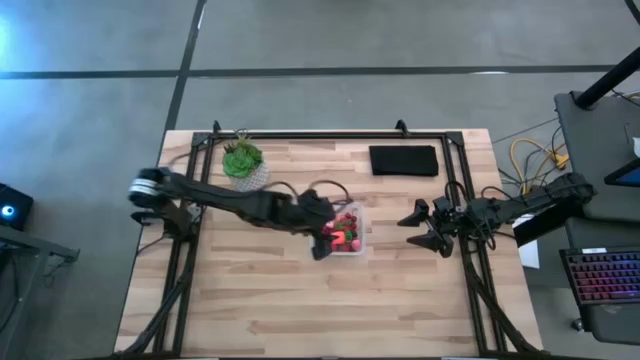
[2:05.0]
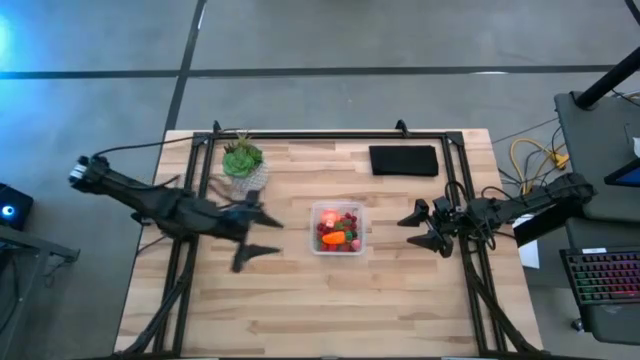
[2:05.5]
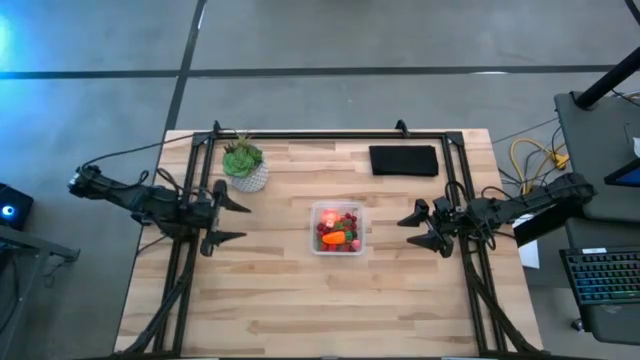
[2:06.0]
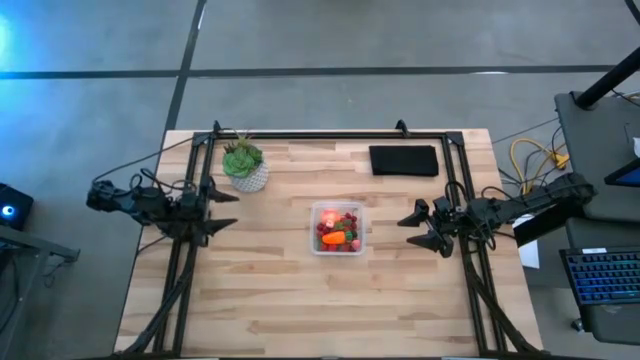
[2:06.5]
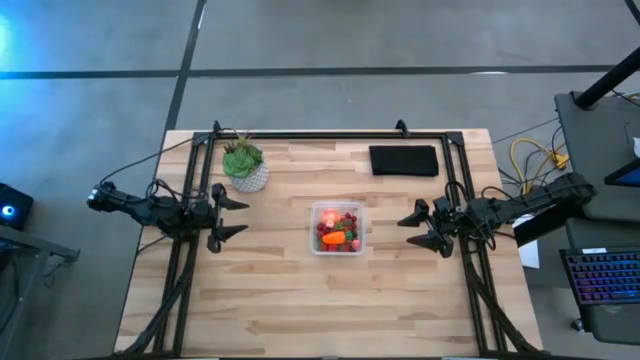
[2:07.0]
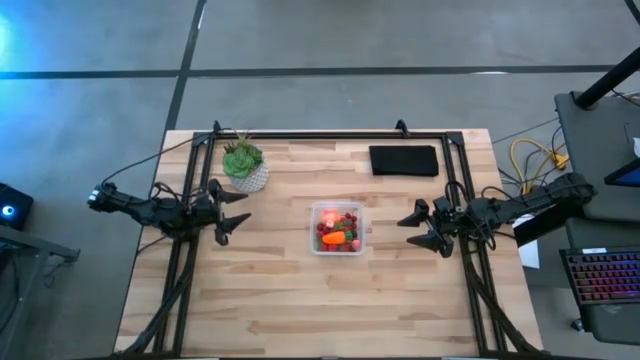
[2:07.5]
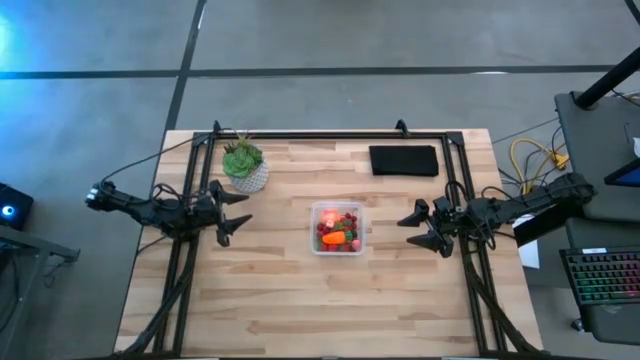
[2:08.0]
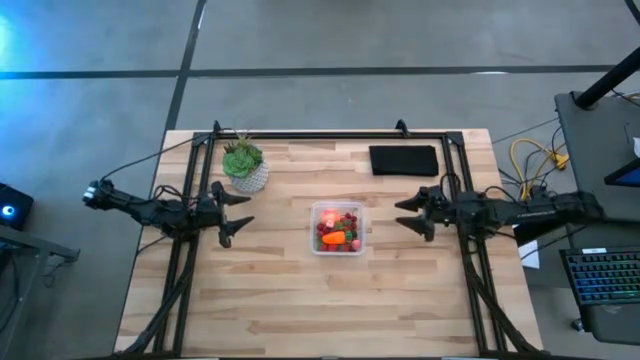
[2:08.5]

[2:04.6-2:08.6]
Task: Pick and placing Produce into tupperware
Return to Home Position

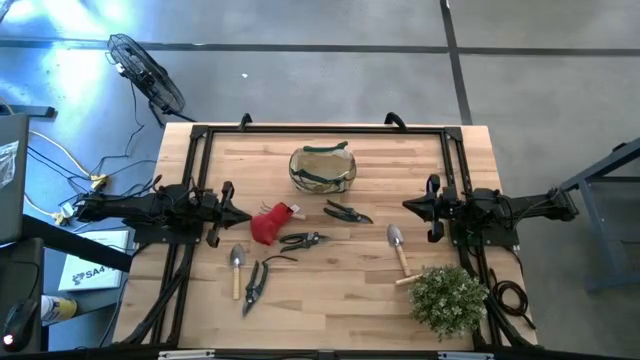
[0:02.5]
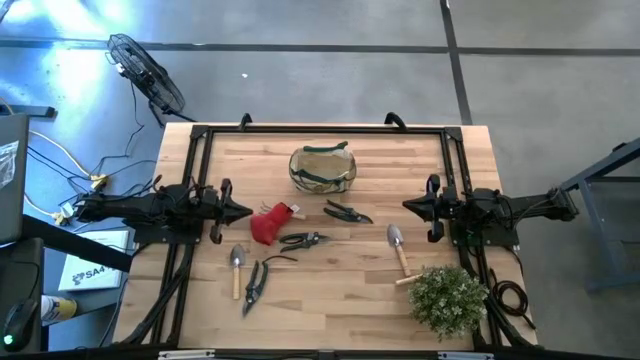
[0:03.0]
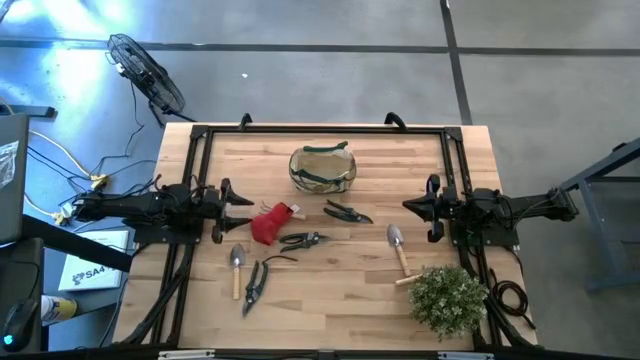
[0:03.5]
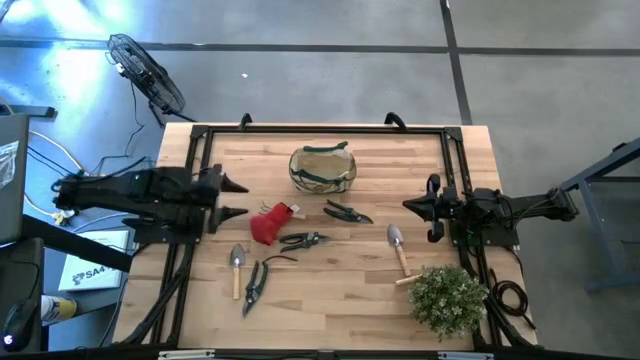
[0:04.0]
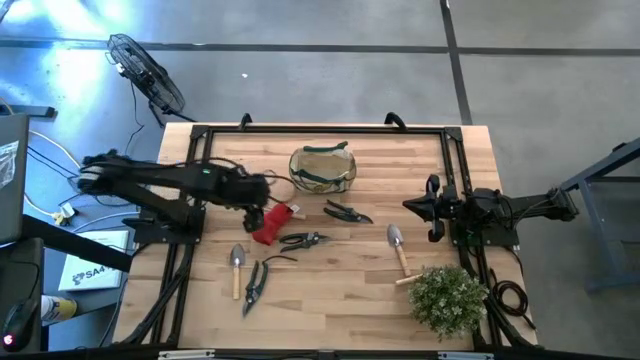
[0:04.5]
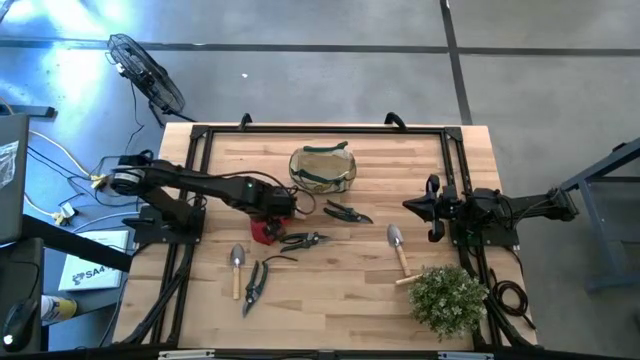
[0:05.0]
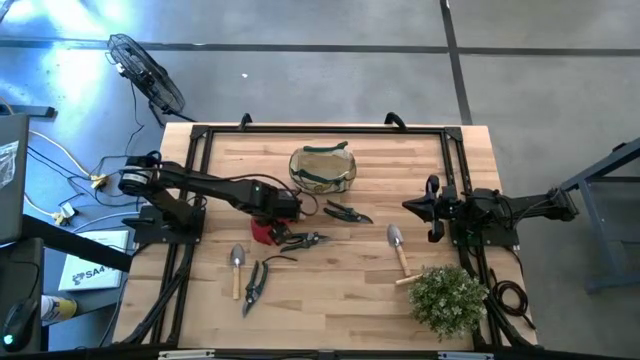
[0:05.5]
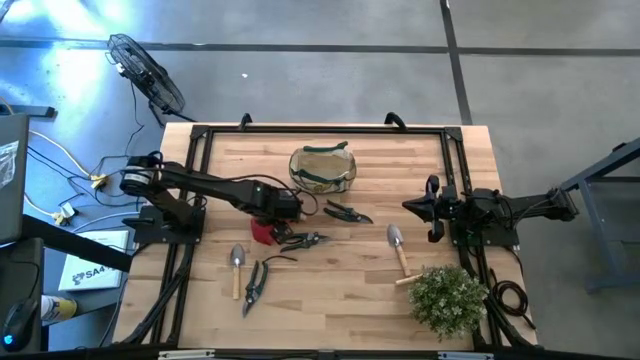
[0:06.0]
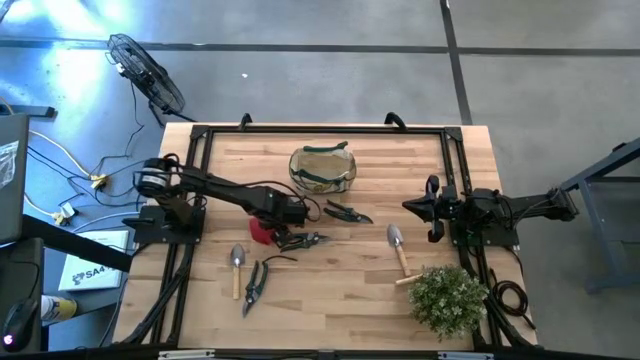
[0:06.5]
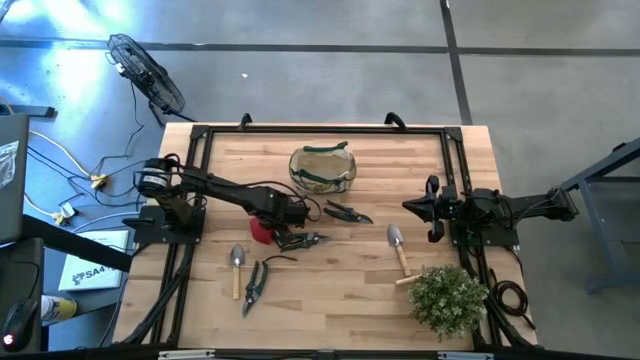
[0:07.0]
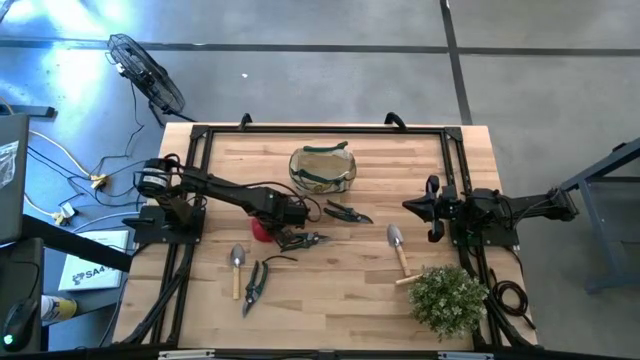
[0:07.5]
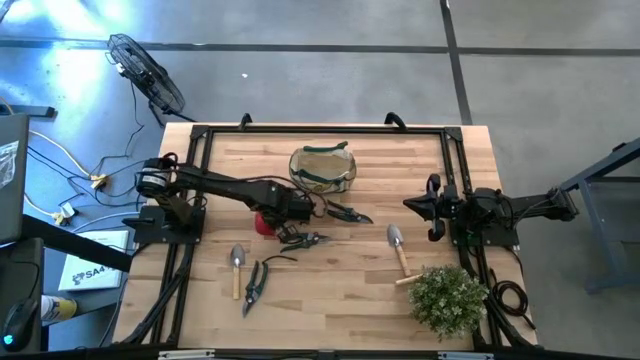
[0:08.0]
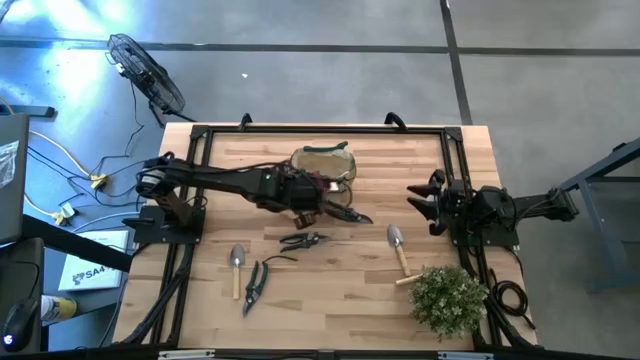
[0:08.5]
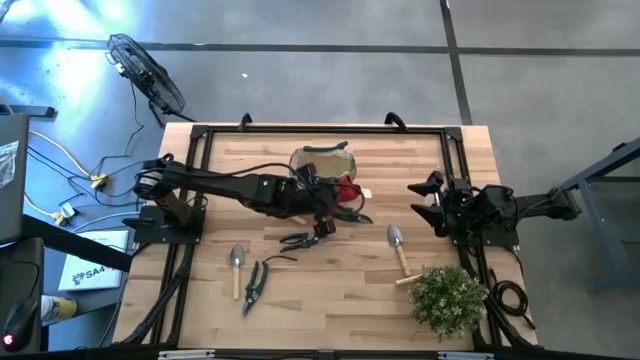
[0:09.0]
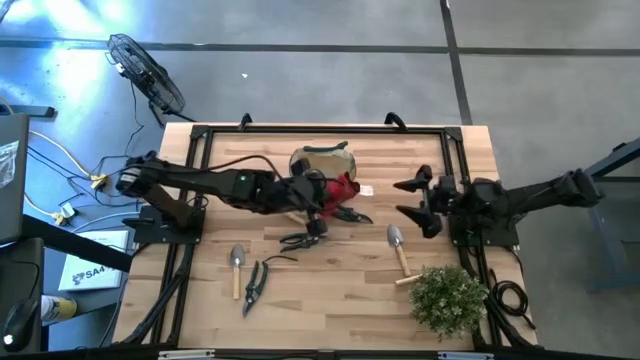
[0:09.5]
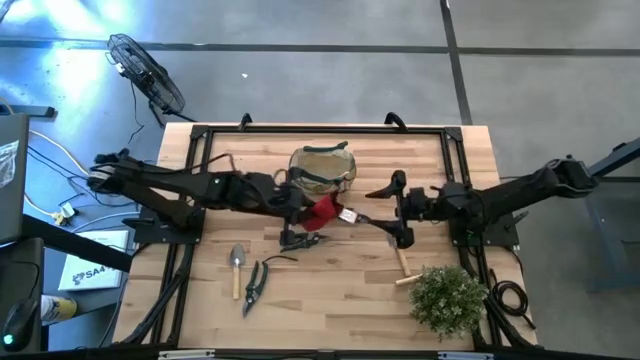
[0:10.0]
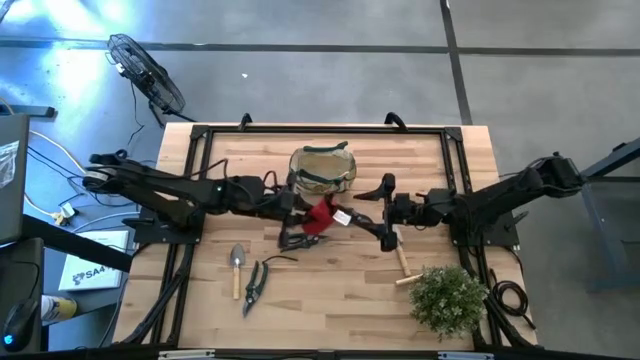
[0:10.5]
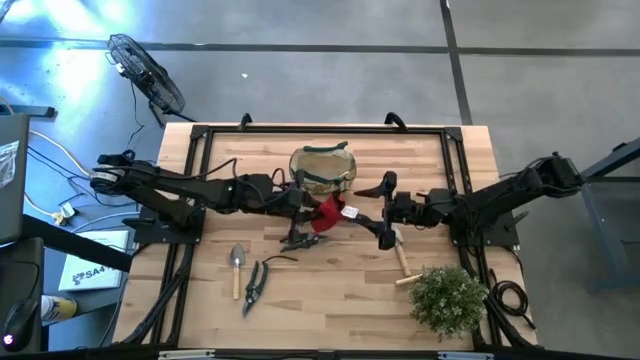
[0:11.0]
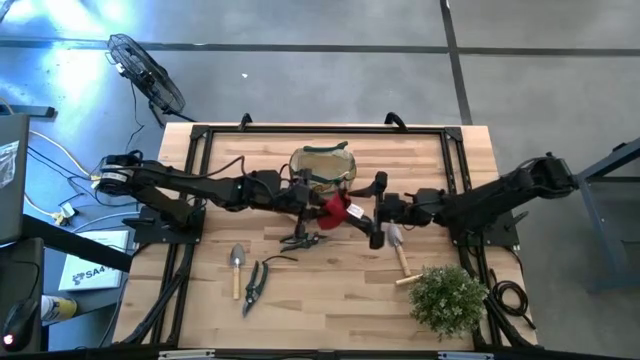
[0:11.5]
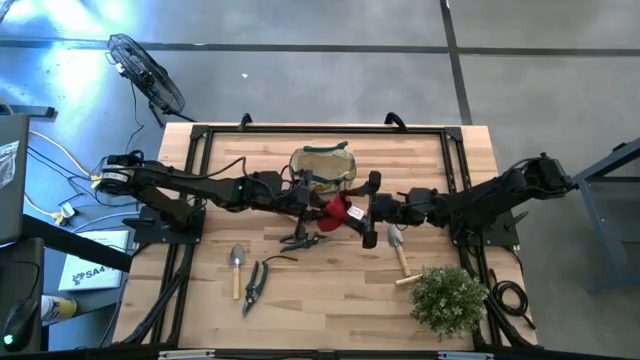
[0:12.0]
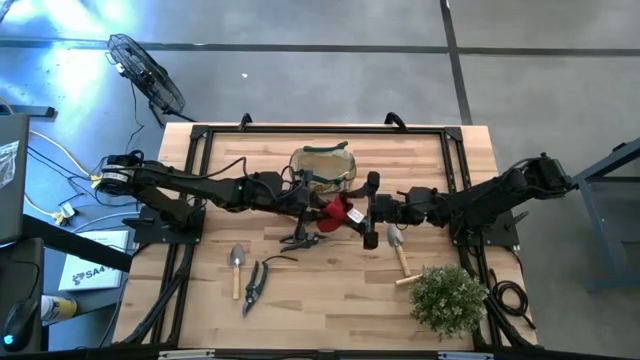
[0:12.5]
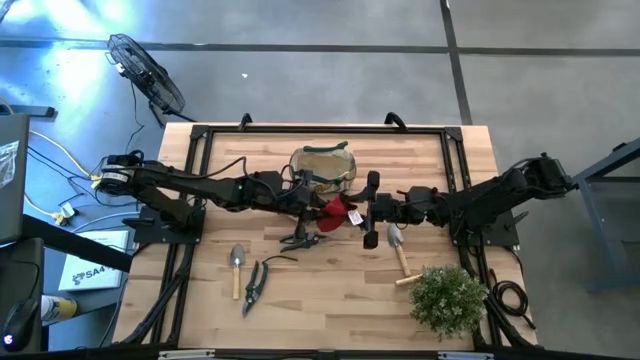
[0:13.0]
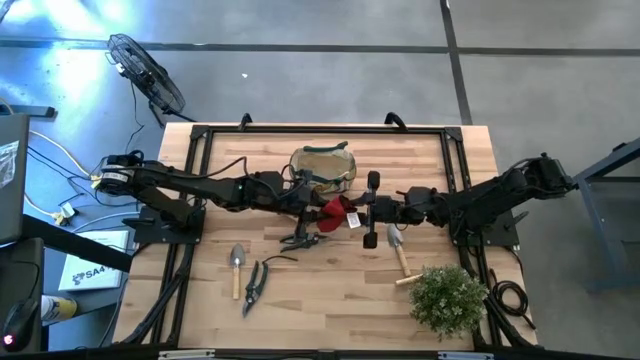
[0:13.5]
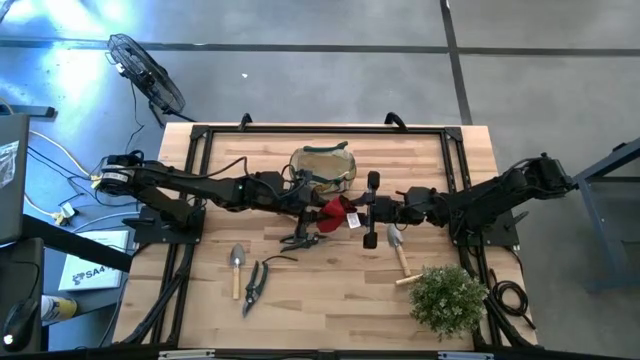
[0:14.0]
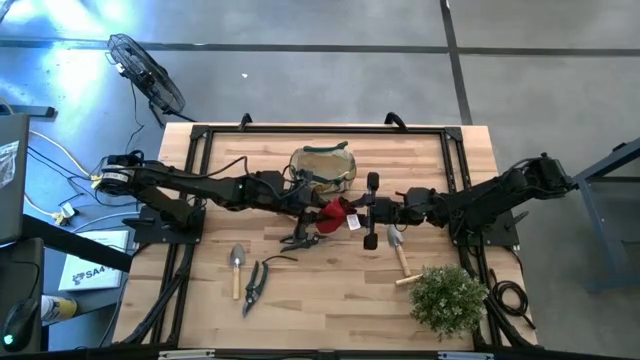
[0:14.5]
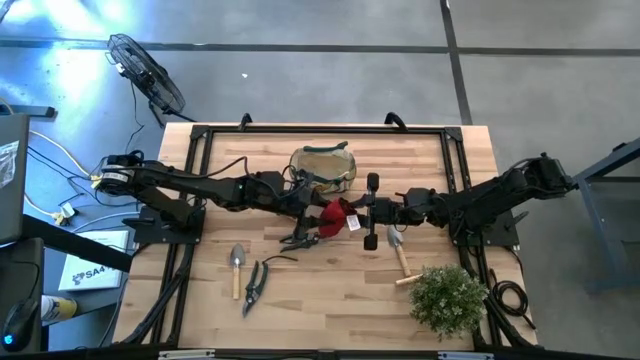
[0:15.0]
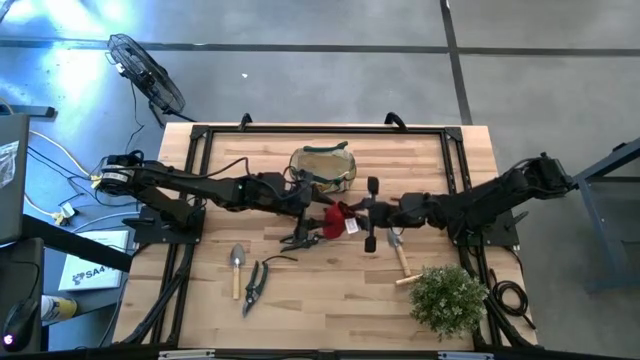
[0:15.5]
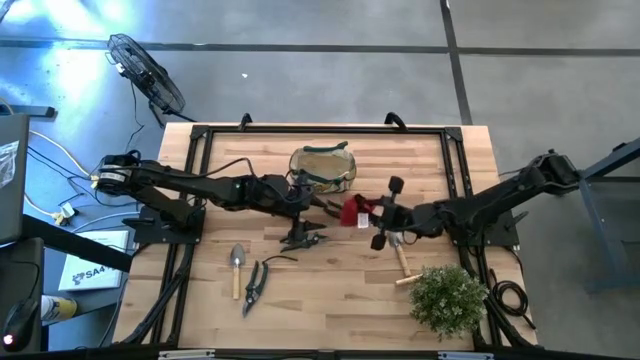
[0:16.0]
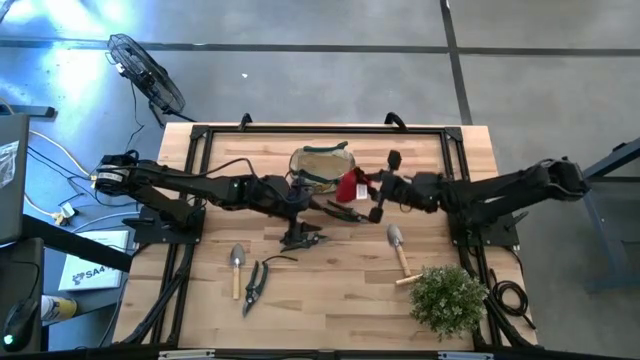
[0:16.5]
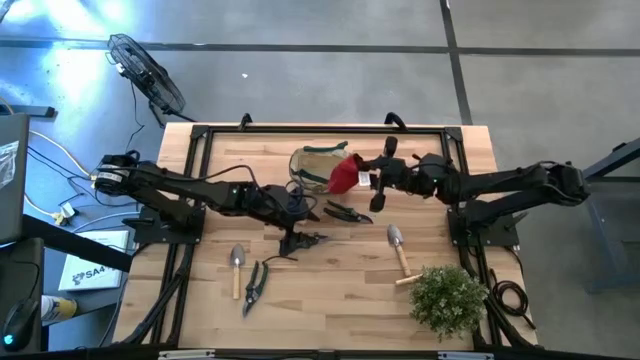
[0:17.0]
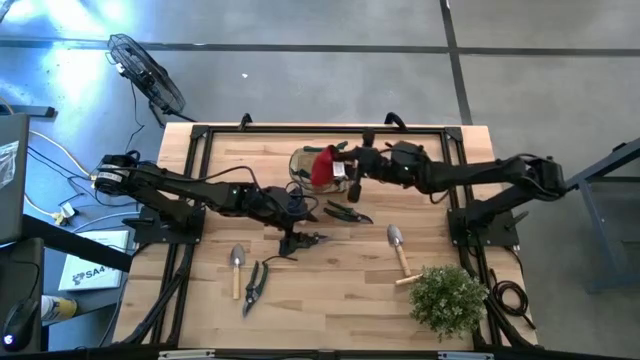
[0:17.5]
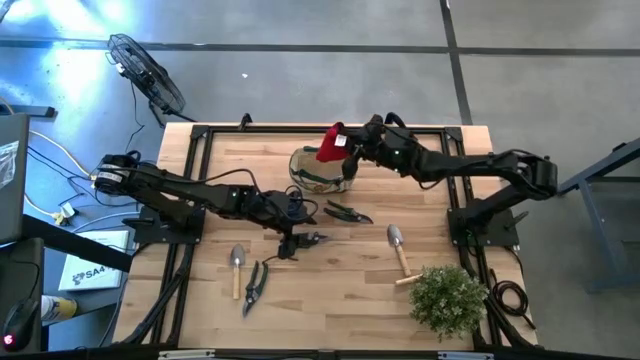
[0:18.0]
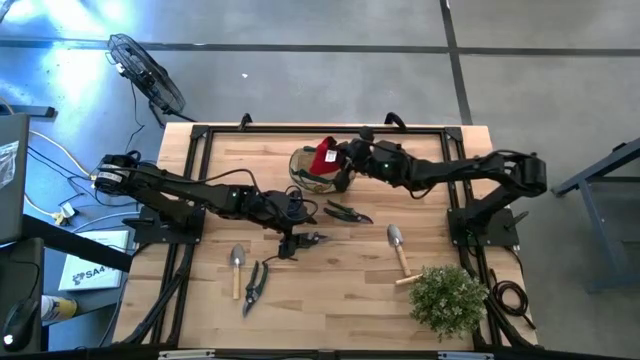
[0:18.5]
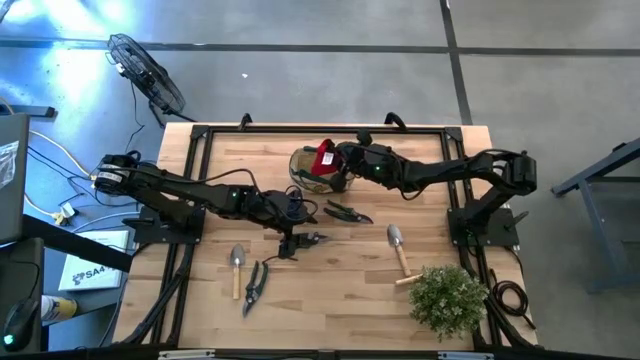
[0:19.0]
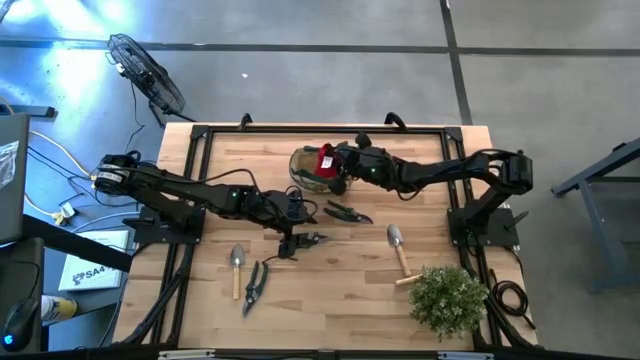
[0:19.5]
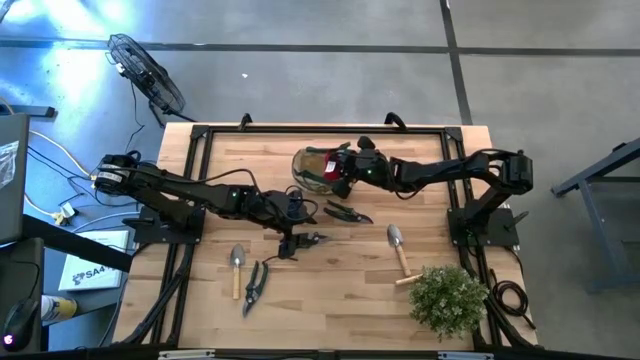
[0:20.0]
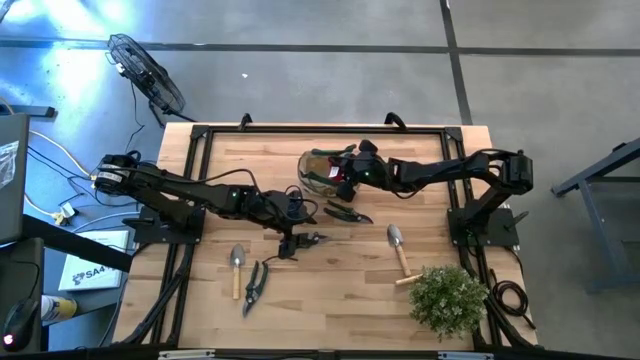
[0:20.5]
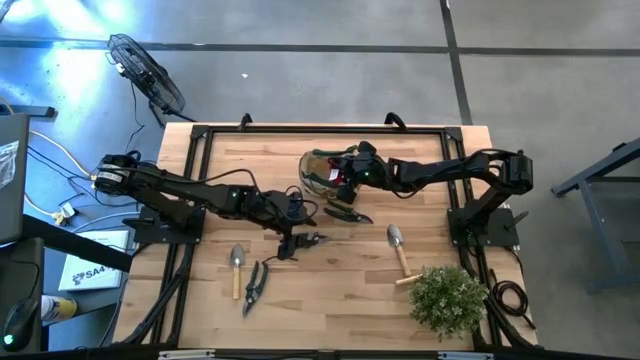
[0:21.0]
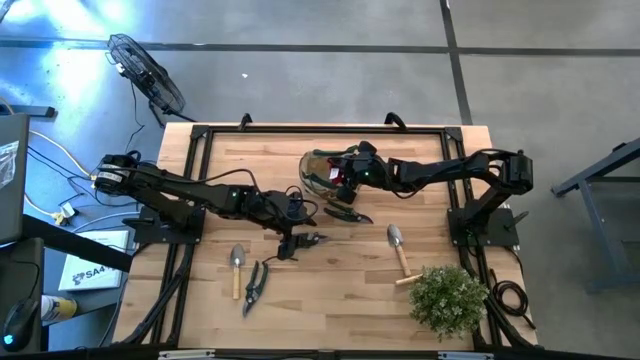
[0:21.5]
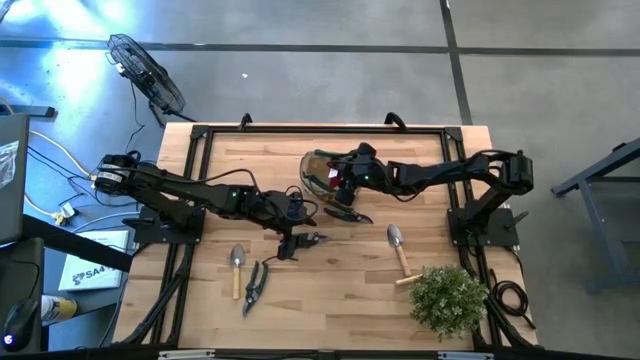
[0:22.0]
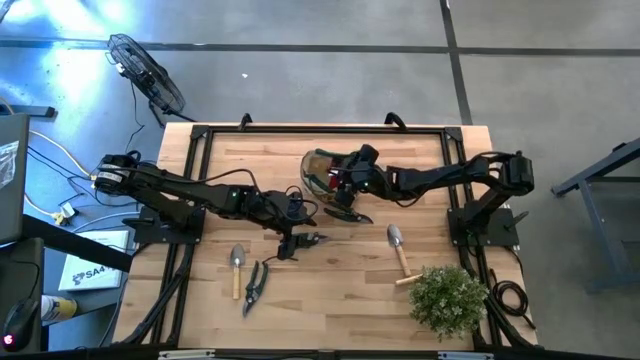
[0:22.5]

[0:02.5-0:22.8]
Task: Pick & Place Garden tools in Gardening bag
Put the red gloves into the light brown gardening bag
